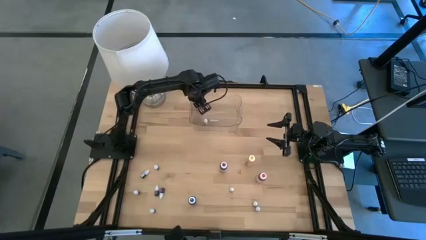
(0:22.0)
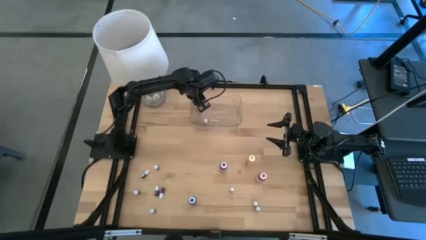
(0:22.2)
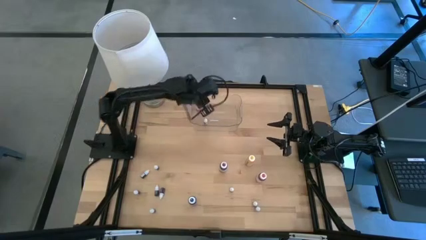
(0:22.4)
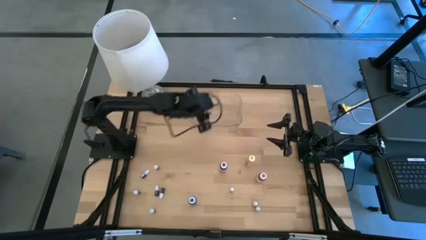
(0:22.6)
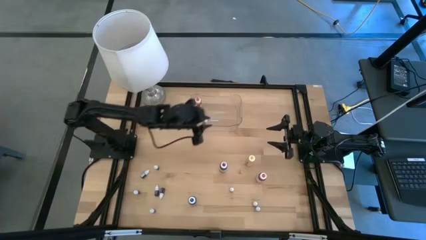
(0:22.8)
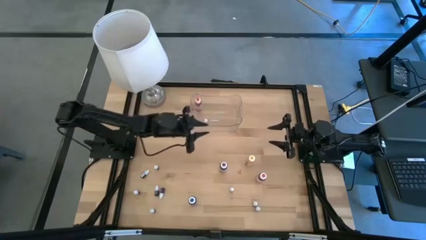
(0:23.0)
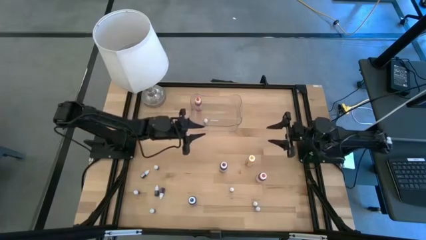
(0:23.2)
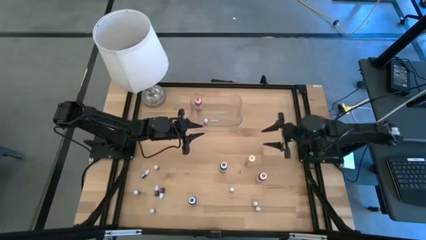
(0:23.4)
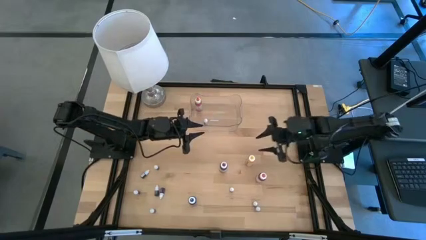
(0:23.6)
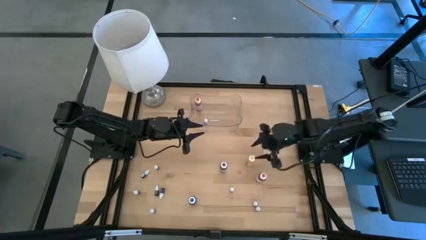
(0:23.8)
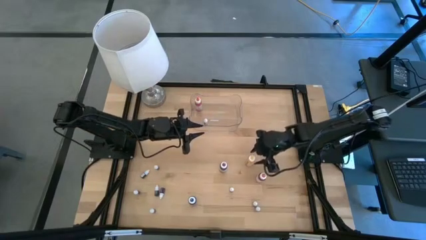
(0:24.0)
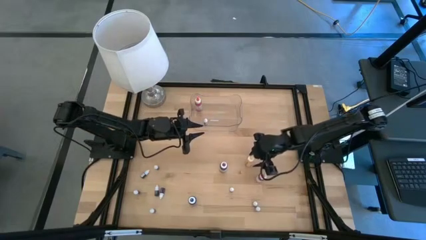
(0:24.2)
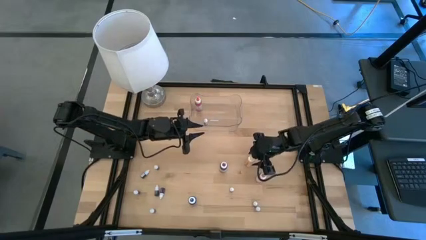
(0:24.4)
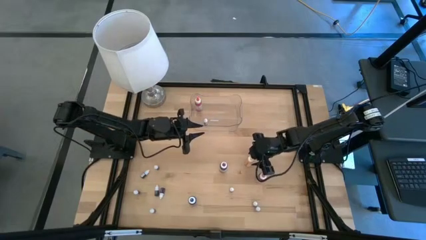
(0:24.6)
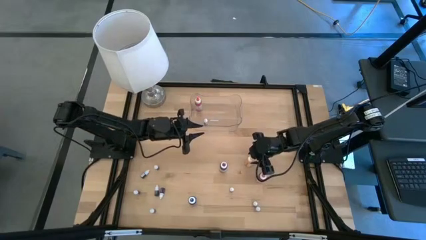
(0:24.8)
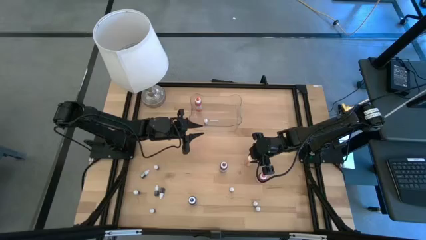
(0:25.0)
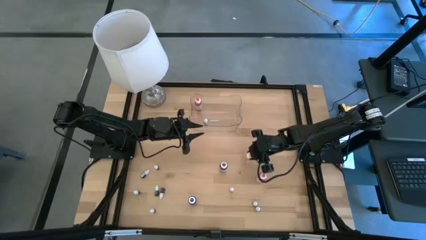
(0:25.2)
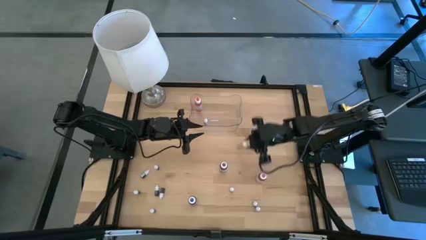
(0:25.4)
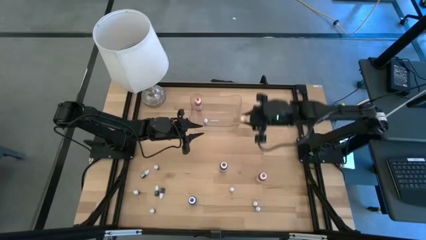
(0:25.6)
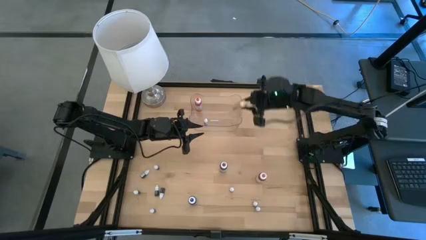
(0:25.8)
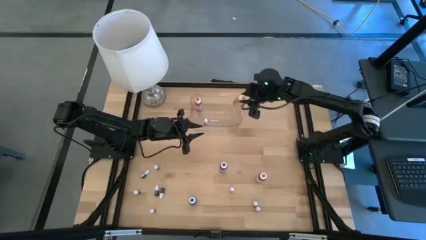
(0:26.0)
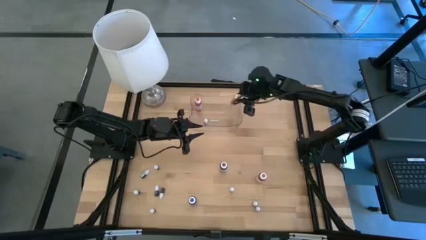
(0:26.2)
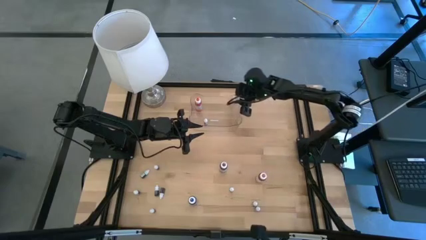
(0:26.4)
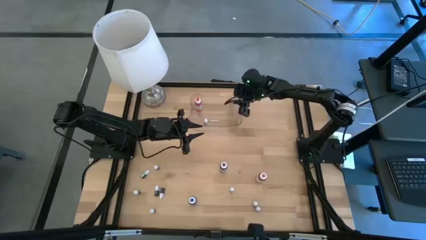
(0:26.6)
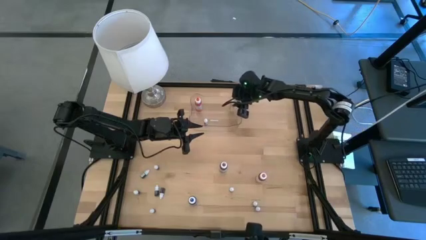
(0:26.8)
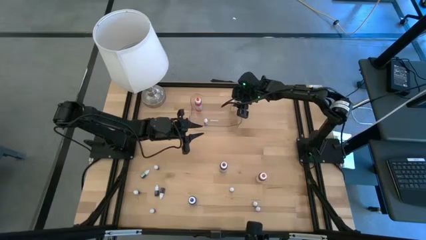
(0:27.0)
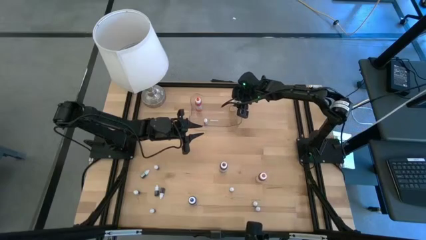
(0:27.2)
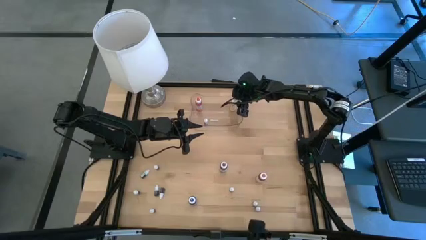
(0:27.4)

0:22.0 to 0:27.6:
Task: Pick & Place food coloring
Put the large yellow food coloring bottle into the transparent bin

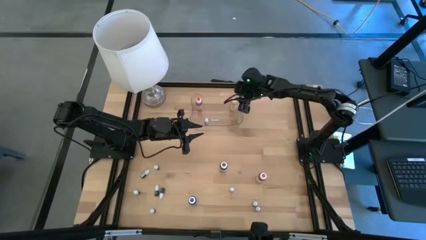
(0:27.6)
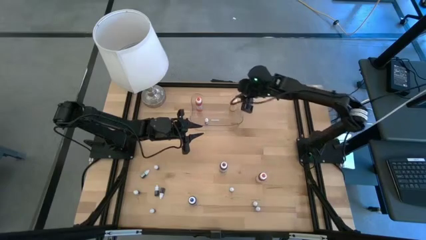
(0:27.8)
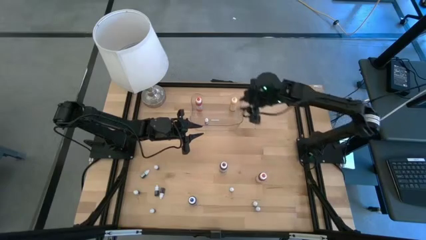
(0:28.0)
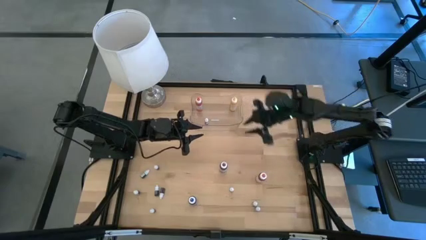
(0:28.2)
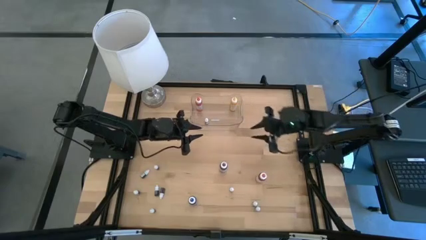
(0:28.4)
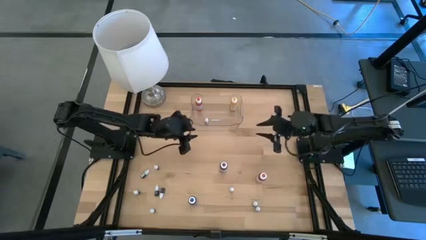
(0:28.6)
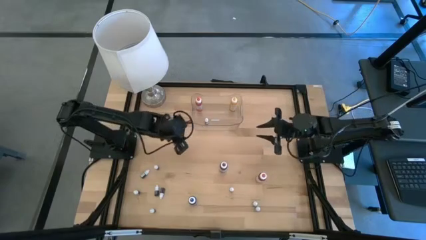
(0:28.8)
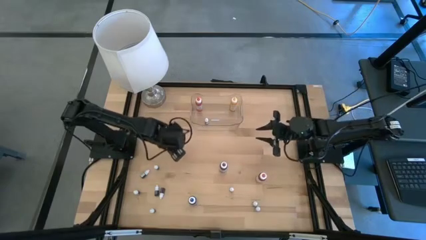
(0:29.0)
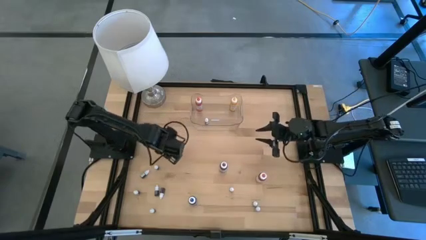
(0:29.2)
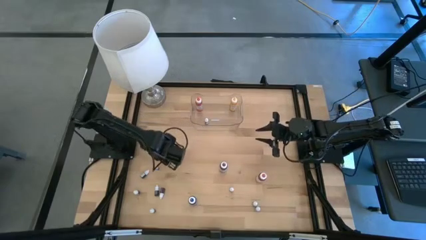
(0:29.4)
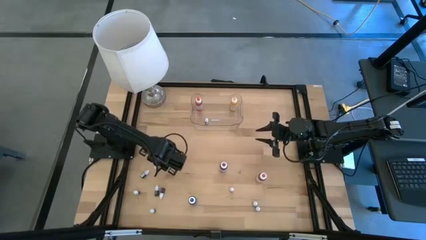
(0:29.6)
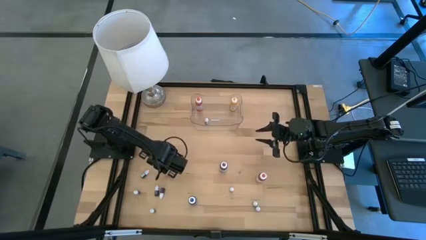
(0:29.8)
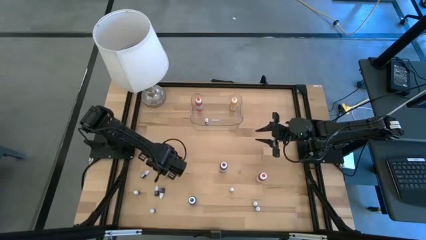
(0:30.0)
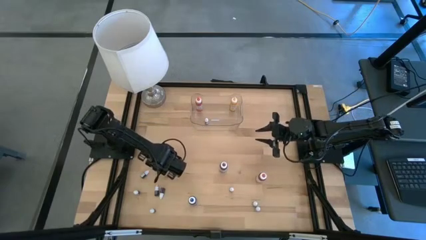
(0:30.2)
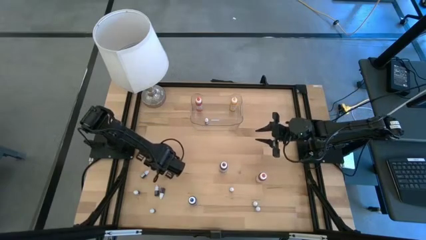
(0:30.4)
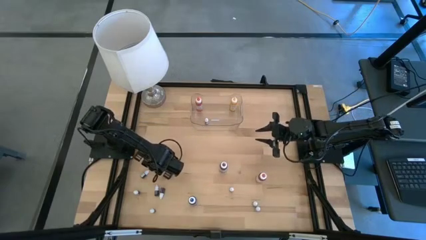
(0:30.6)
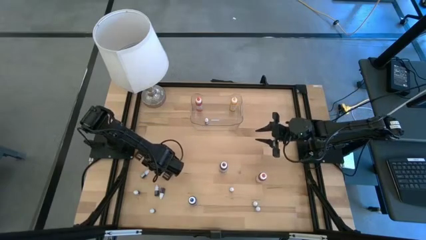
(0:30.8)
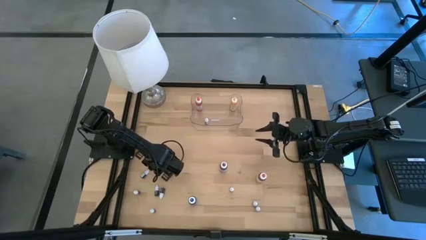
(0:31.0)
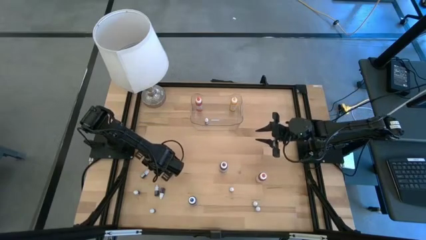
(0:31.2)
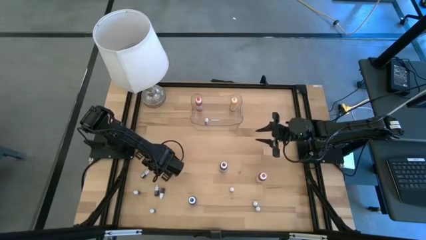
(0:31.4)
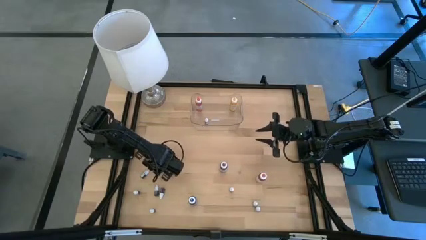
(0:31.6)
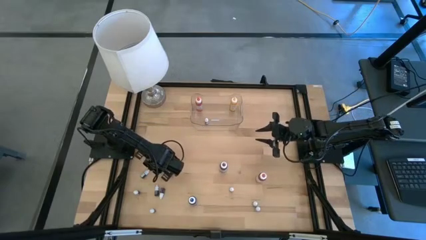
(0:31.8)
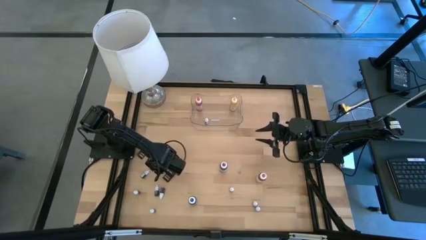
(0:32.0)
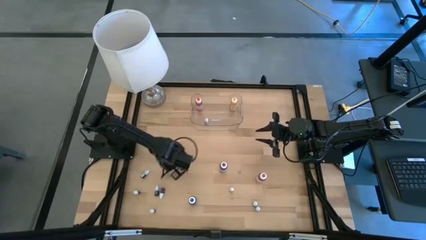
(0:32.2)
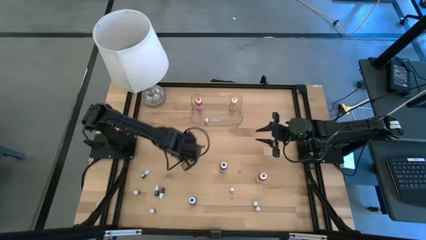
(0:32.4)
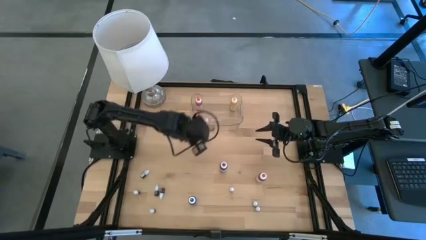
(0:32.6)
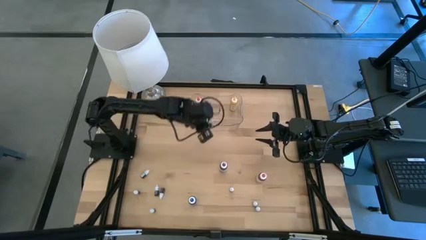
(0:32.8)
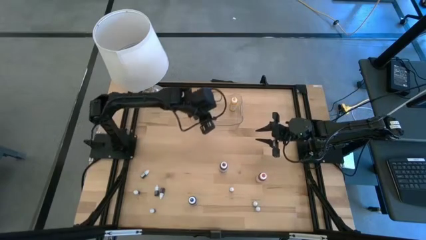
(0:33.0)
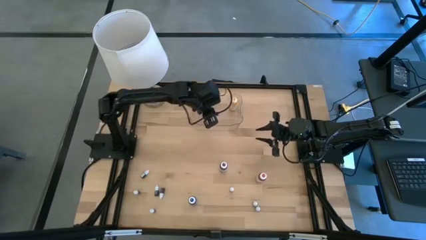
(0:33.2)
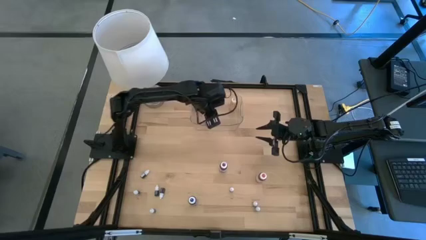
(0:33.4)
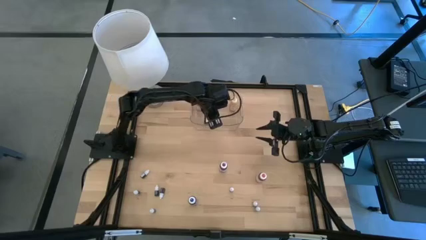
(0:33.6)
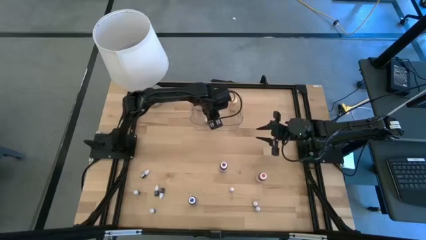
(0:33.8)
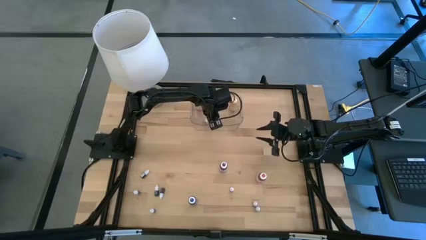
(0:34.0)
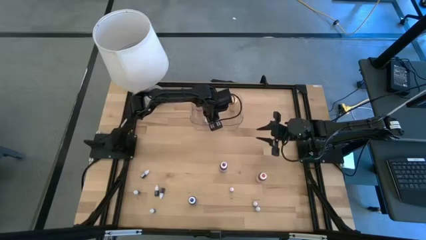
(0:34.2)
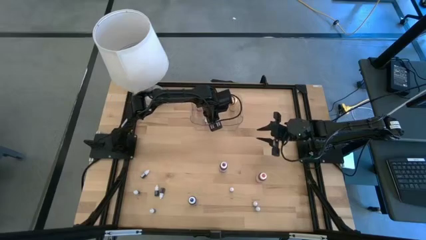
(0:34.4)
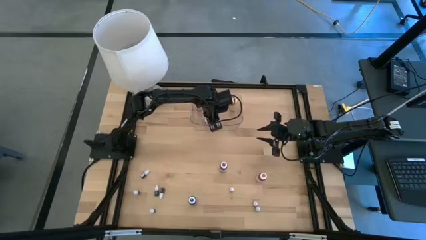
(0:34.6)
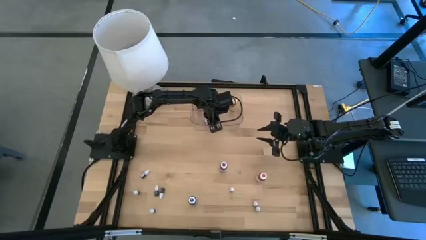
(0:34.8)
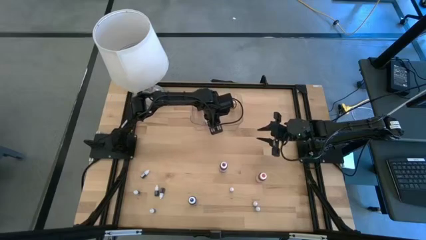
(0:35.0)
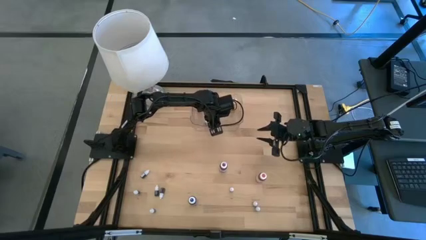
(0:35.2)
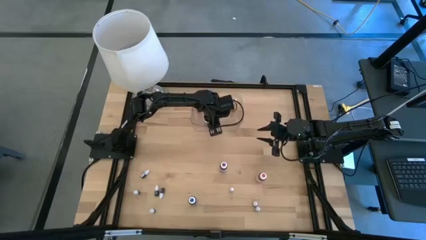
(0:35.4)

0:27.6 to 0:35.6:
Put the small brown food coloring bottle into the transparent bin

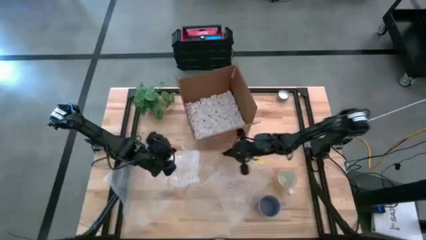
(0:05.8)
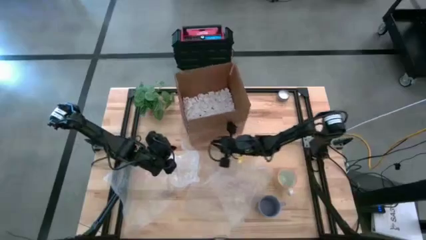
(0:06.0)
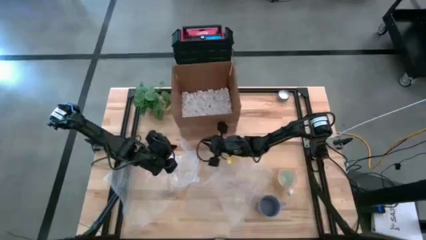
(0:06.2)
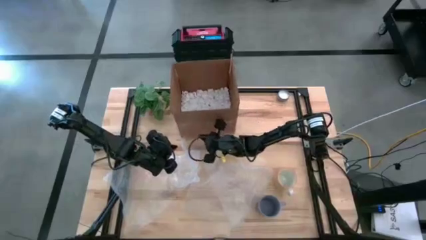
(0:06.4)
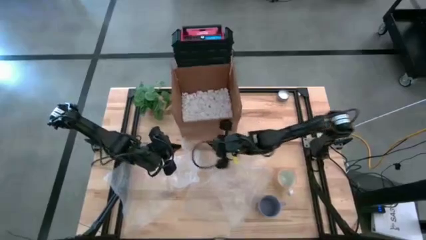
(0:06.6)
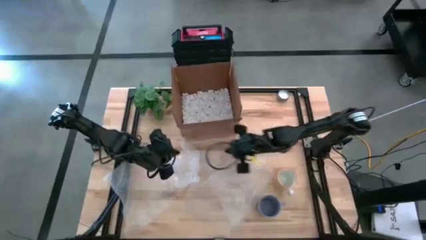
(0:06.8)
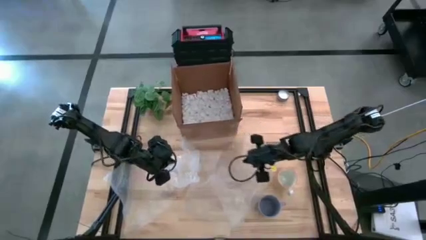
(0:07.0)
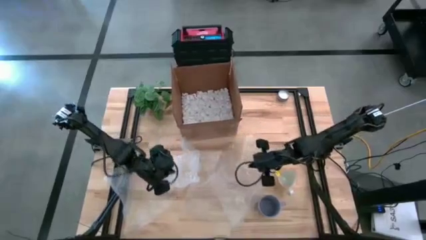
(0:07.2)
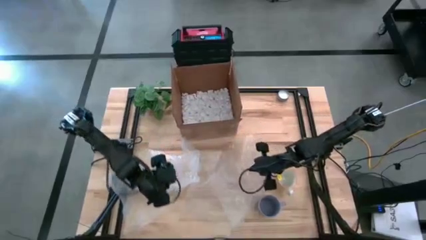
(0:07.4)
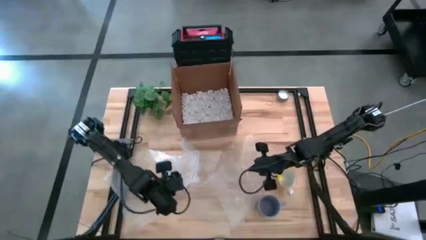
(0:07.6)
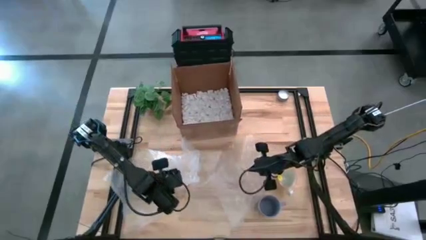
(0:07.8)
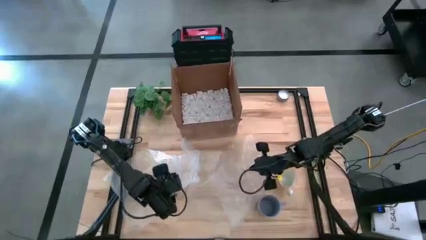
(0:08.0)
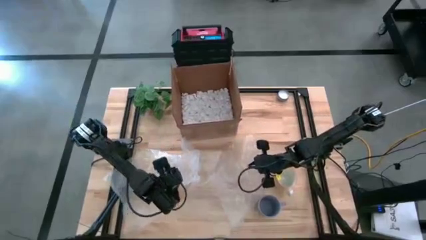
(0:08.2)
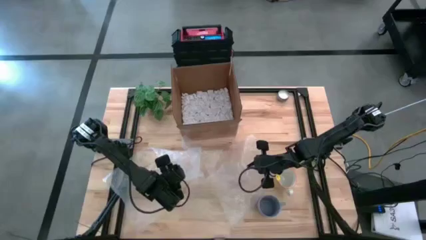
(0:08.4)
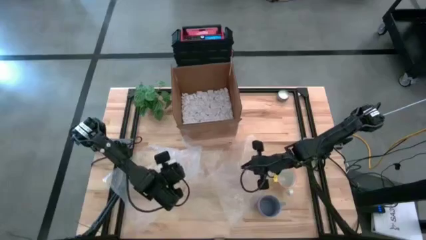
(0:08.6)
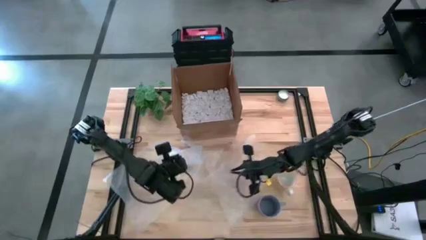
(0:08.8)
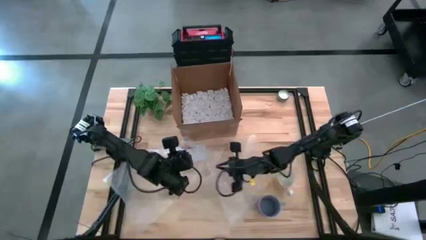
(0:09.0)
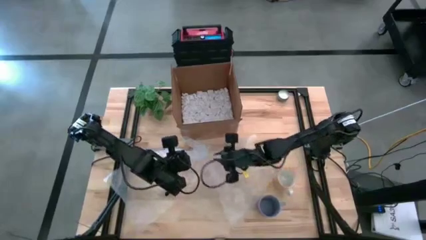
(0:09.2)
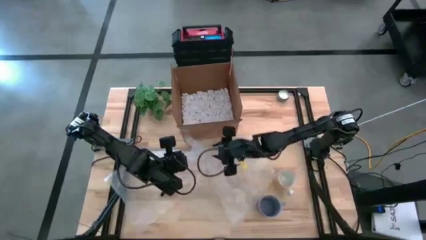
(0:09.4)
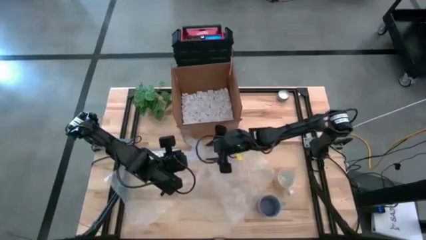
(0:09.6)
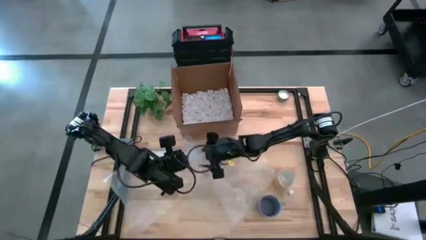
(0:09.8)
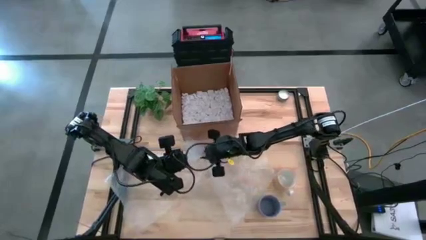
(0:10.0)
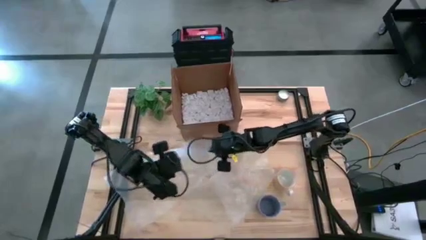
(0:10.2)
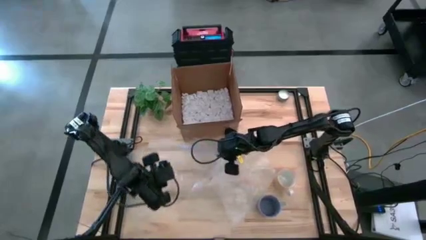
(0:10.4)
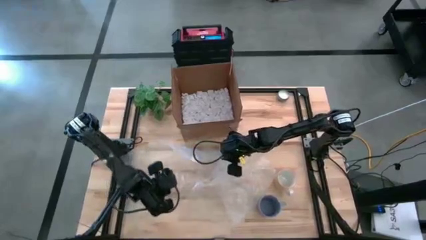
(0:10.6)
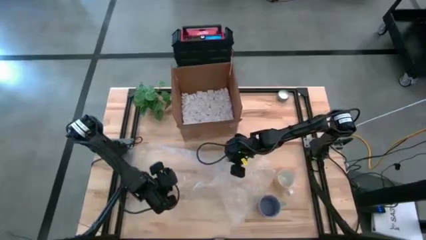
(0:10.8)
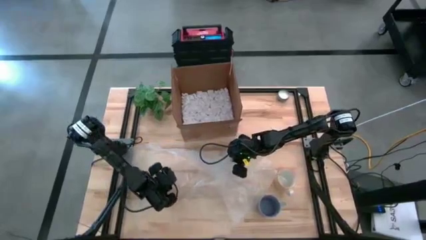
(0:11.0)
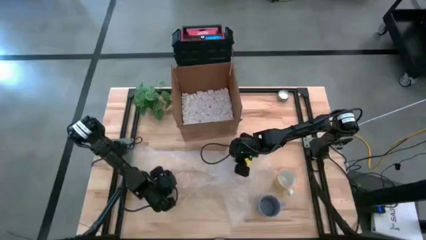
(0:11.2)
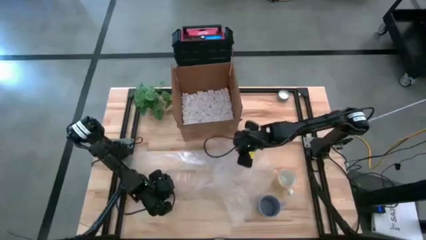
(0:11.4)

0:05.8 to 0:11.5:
Task: wrap mug
Prepare the left bubble wrap
